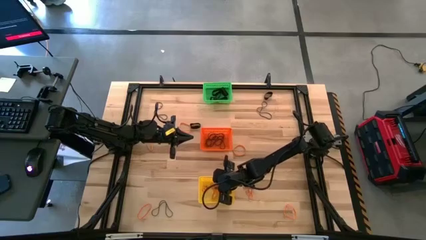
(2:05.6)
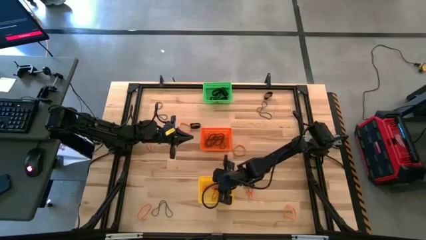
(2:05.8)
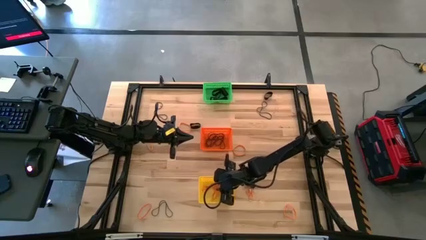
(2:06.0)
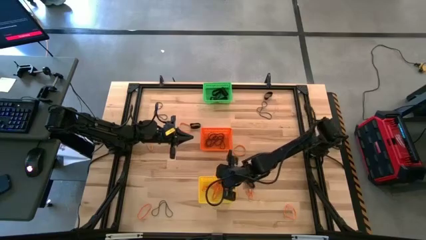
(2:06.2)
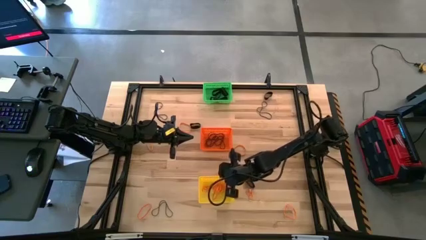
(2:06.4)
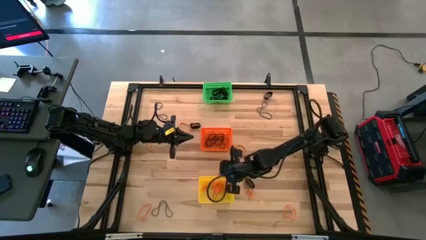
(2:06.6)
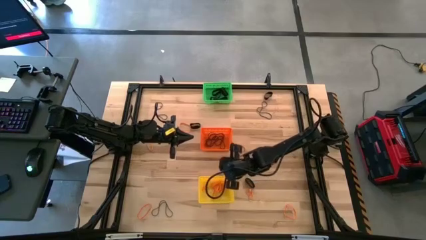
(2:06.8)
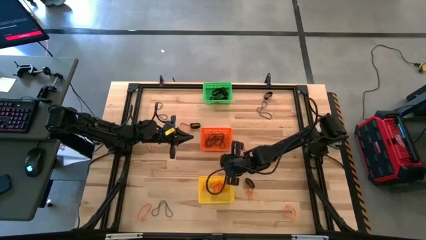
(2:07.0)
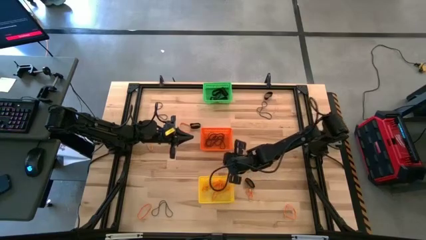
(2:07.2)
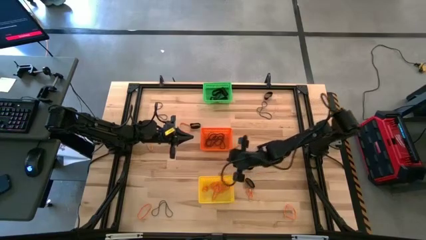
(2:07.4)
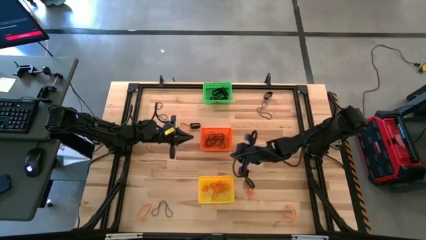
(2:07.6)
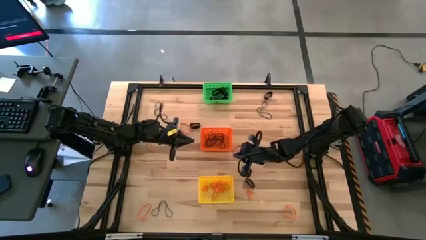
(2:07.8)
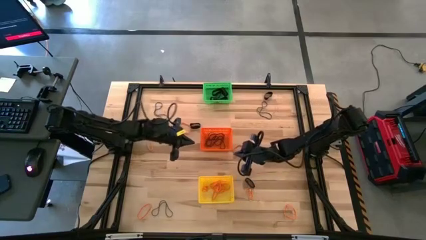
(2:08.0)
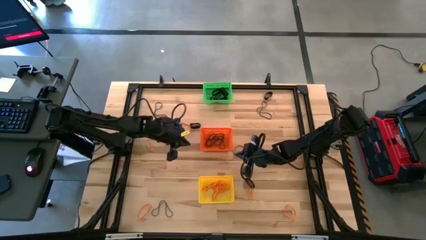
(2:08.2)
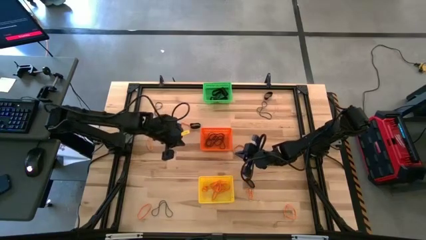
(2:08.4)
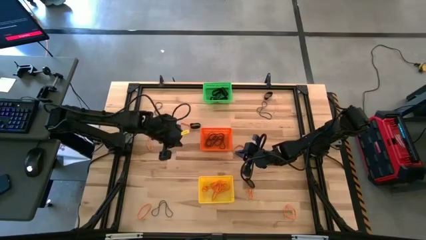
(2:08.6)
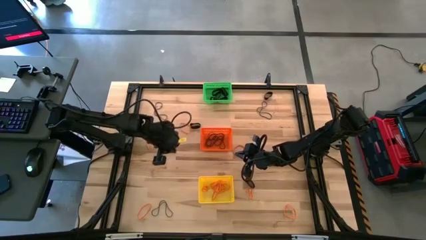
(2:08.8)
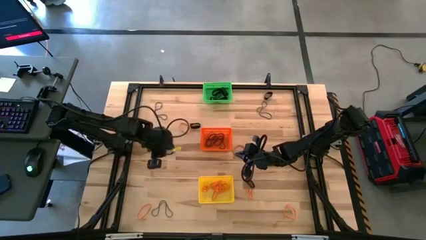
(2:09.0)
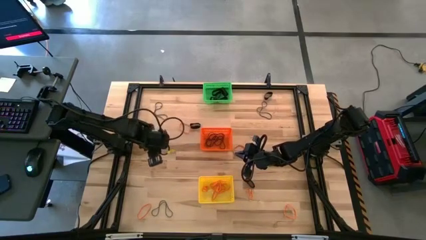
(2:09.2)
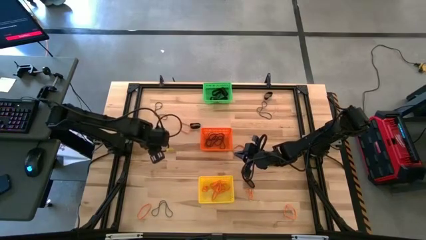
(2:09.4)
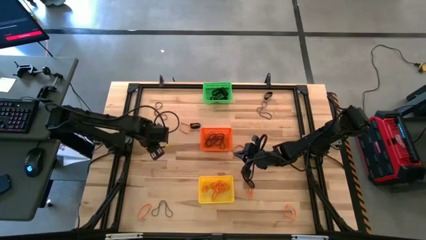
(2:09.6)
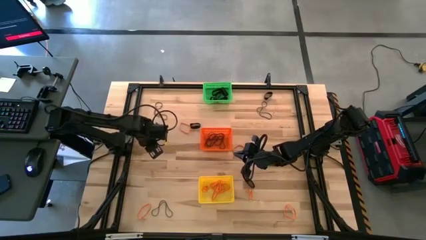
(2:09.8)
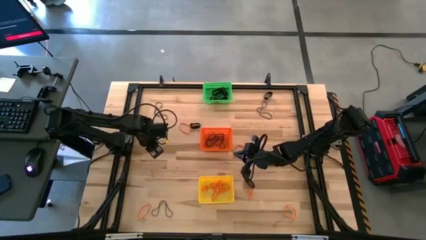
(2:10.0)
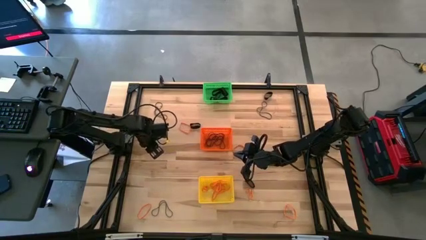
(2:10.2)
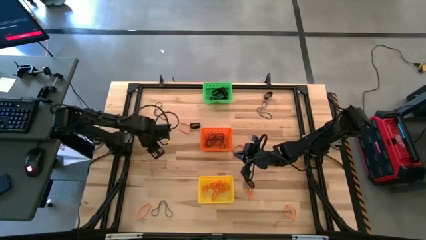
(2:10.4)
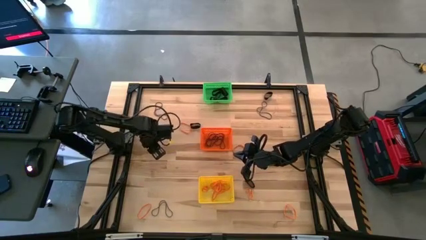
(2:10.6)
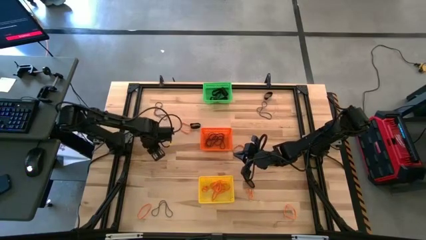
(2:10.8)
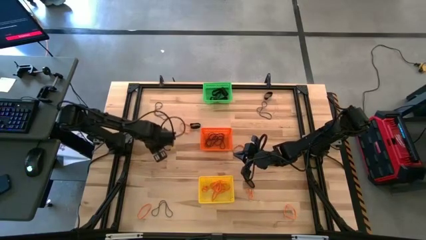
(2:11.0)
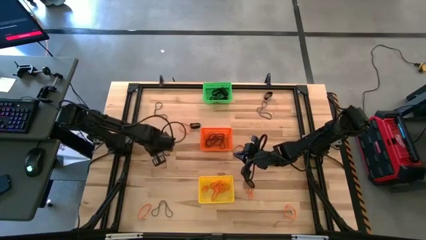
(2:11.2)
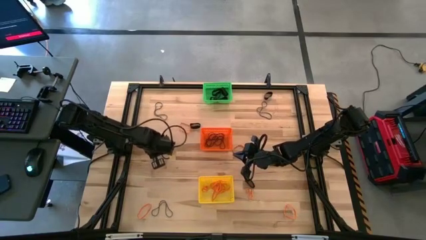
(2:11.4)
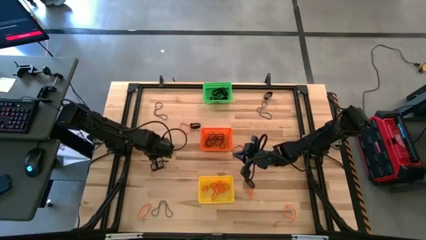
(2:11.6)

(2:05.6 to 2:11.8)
Task: Sort rubber bands into baskets
Put the orange rubber band into the yellow bin

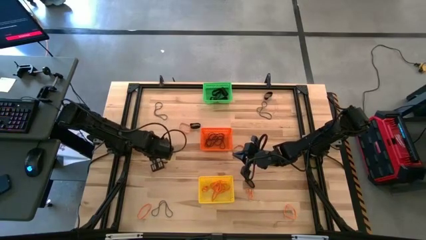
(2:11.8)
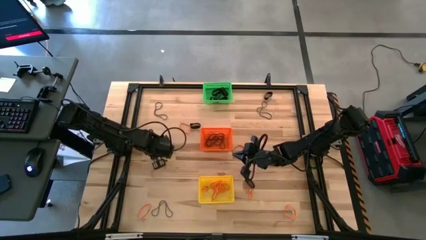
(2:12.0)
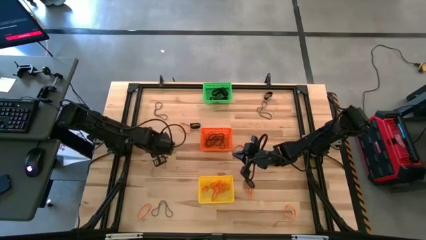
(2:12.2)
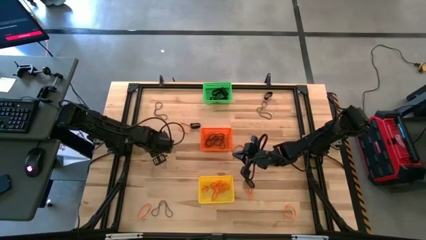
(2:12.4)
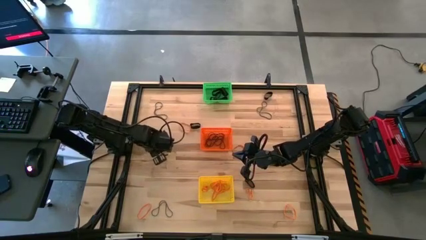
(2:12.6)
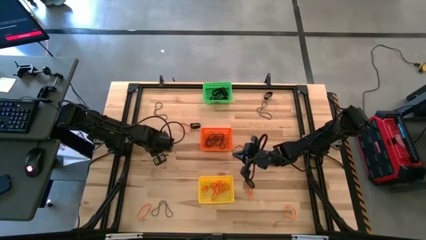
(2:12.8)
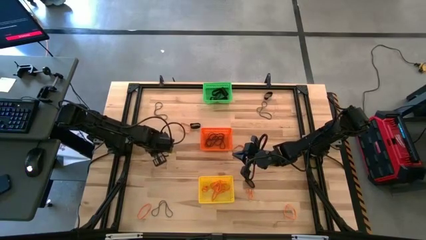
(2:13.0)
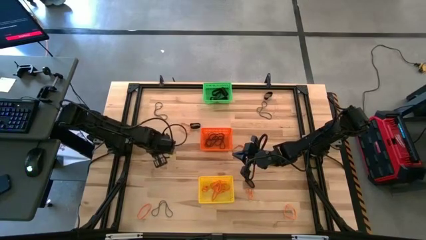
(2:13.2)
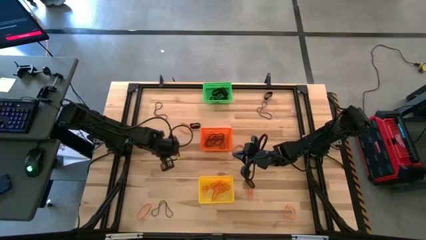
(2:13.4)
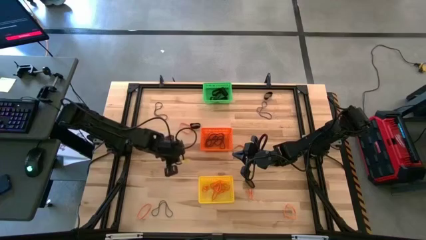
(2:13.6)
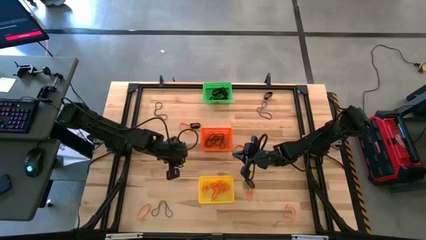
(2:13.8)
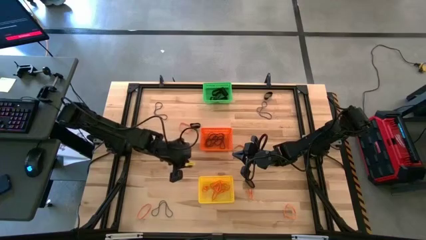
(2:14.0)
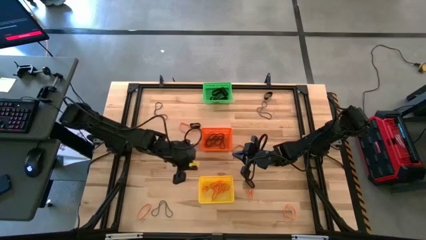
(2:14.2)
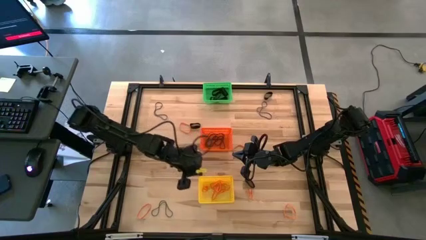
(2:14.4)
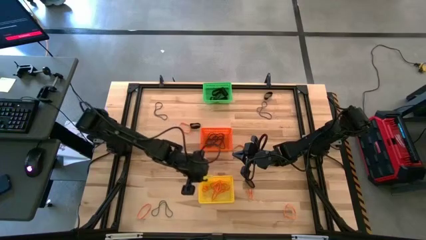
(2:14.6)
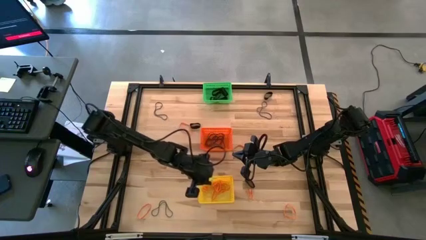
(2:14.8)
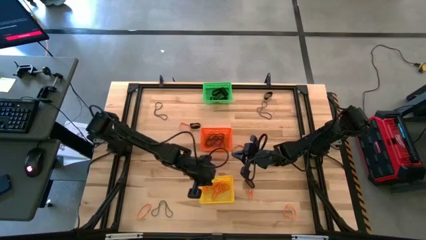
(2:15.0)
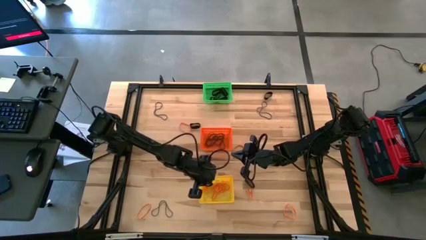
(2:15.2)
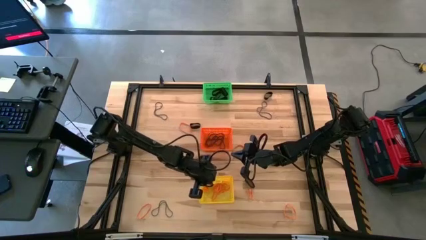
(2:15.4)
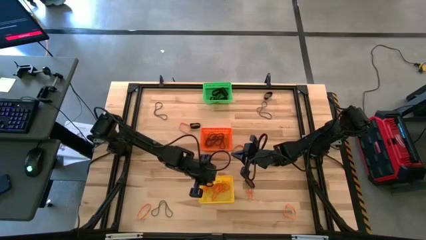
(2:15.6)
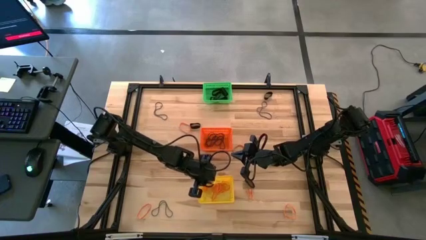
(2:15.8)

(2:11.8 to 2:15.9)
Put the orange rubber band into the yellow bin

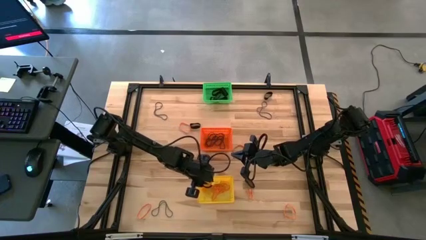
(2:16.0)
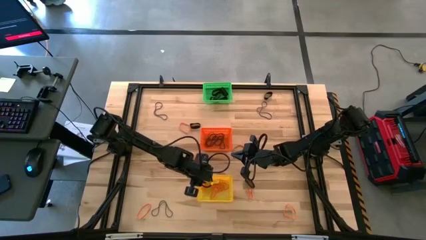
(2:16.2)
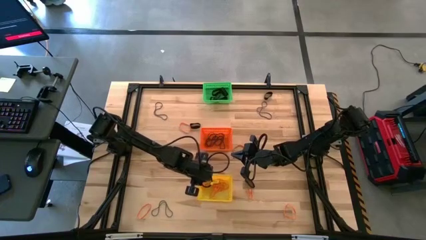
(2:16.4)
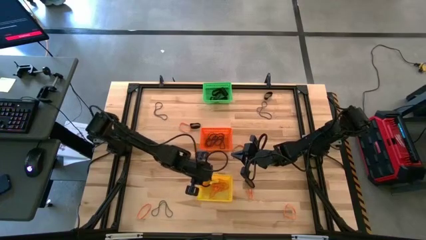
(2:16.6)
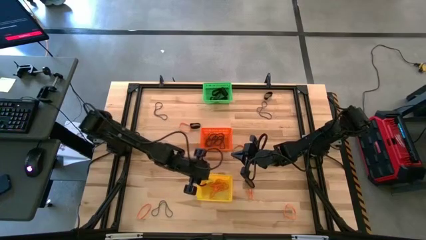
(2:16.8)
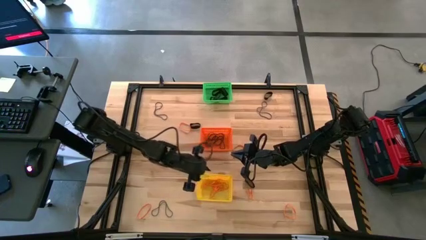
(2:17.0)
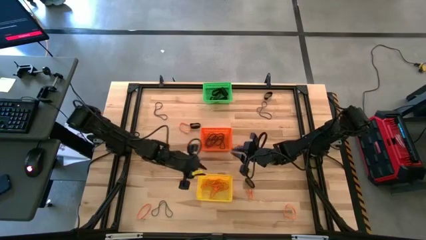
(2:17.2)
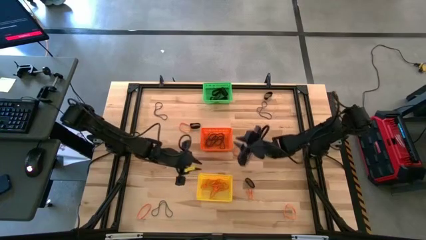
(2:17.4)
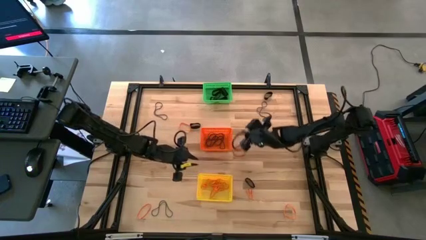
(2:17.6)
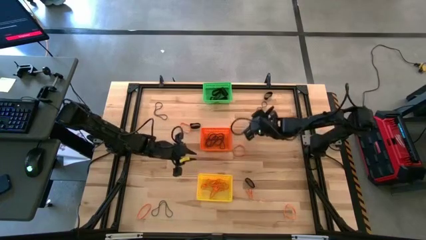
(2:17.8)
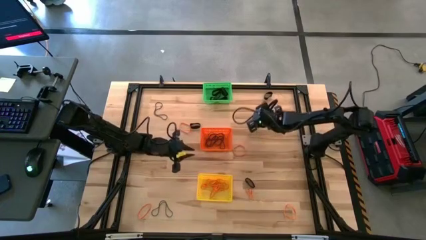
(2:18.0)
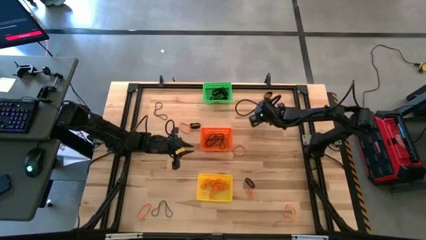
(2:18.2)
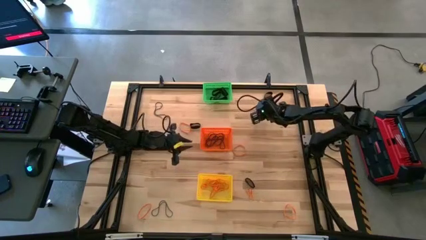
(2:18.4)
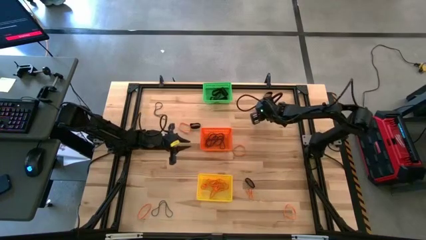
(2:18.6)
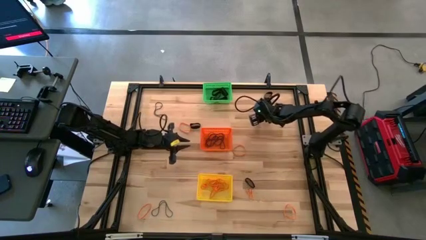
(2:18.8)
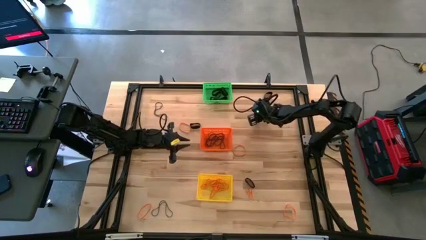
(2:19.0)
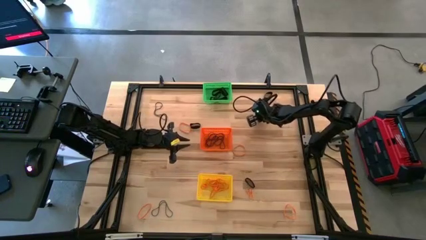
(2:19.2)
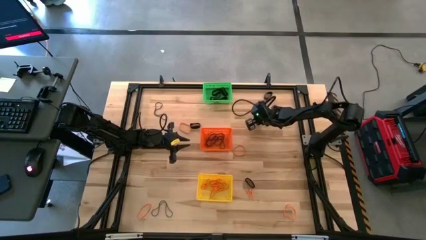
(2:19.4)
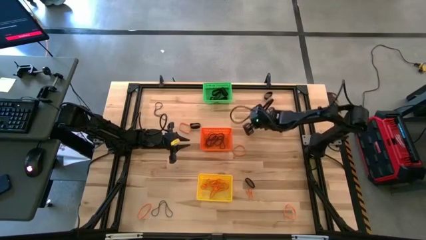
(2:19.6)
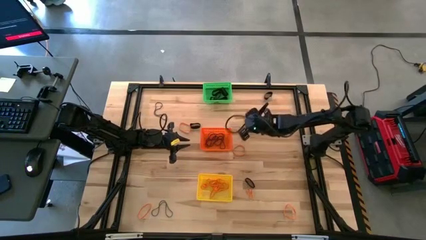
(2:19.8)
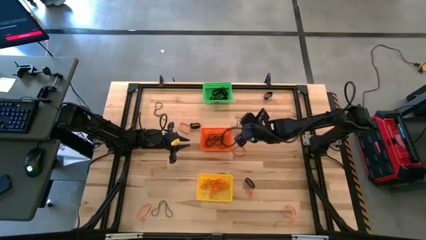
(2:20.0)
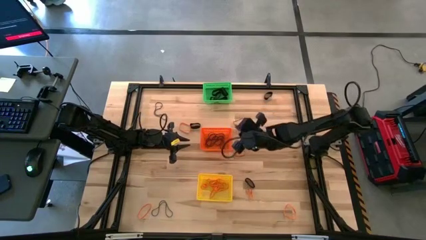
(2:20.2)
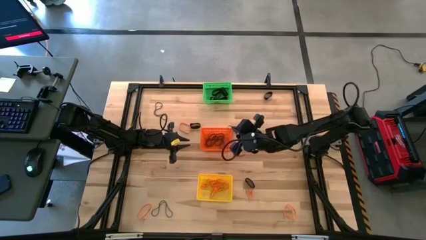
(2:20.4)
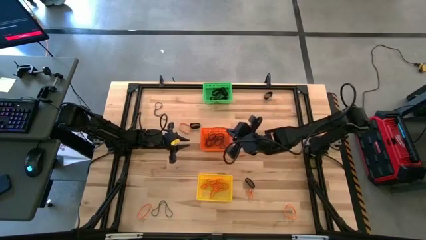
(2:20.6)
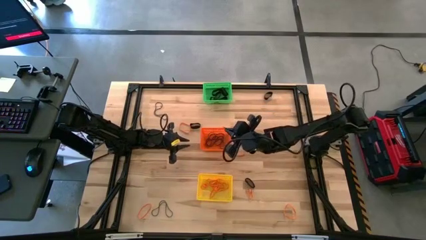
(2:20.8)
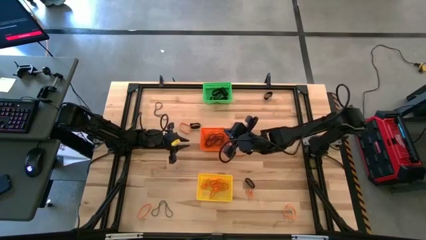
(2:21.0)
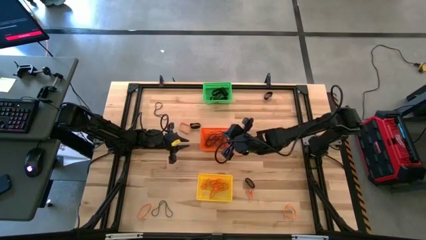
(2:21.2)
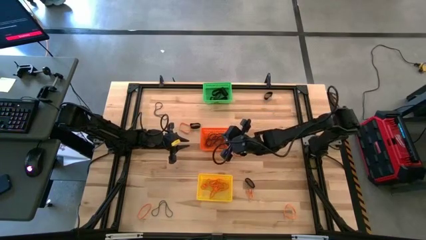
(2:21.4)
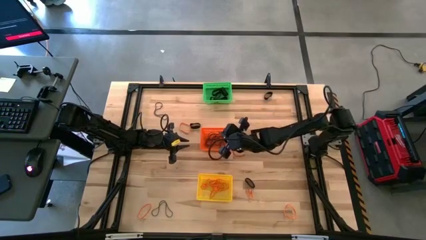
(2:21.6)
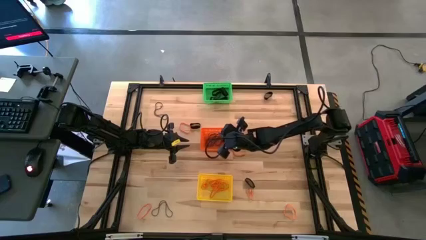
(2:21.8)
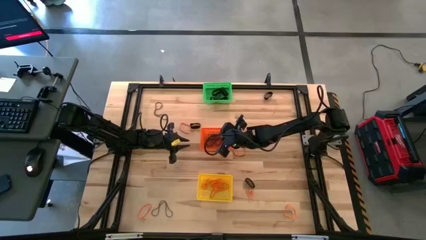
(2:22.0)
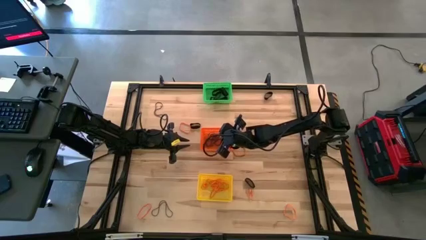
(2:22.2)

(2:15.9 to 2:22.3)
Put the purple rubber band into the orange bin
